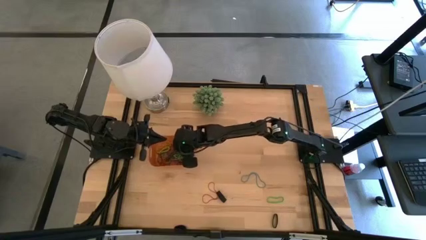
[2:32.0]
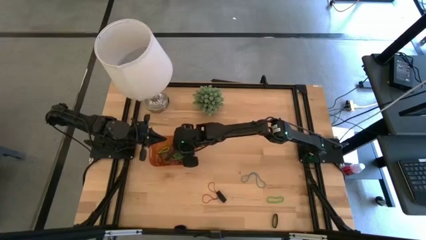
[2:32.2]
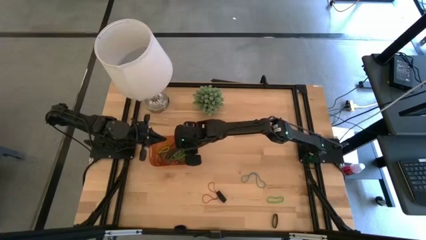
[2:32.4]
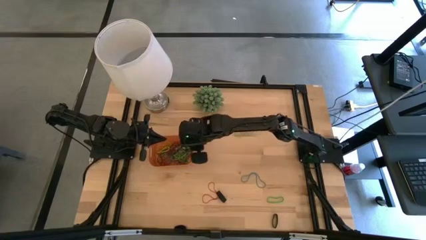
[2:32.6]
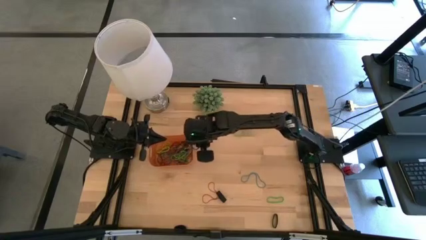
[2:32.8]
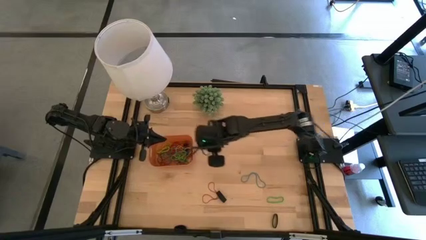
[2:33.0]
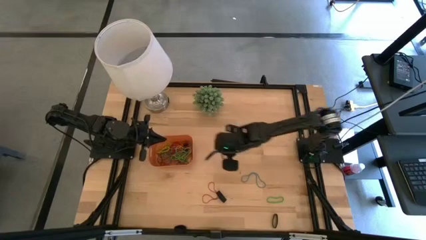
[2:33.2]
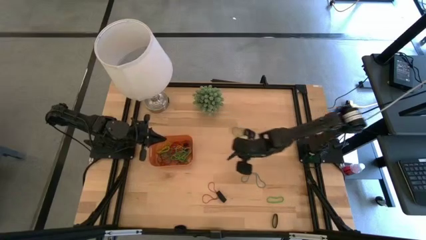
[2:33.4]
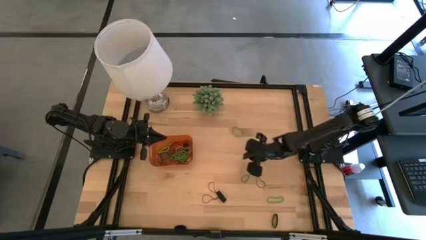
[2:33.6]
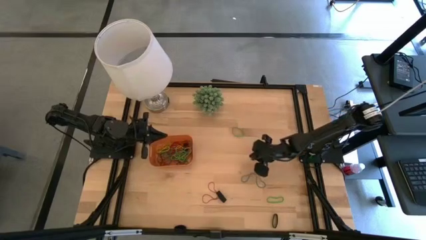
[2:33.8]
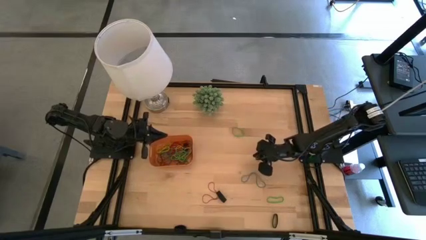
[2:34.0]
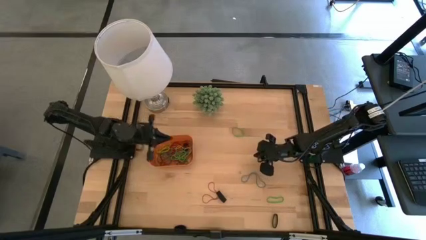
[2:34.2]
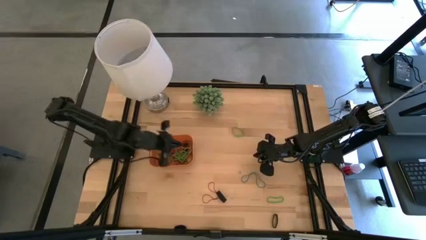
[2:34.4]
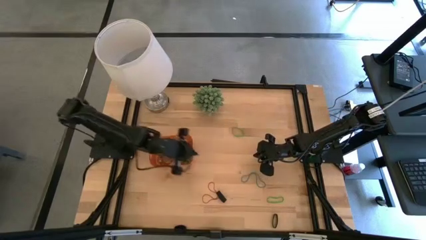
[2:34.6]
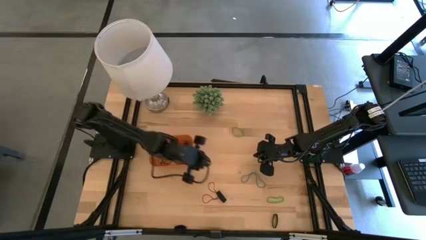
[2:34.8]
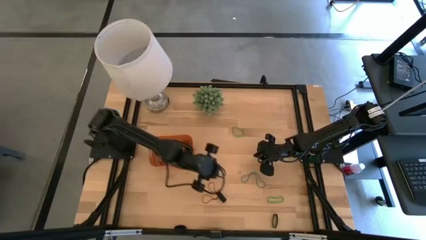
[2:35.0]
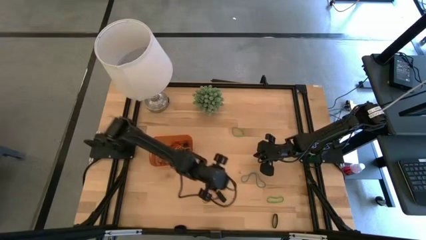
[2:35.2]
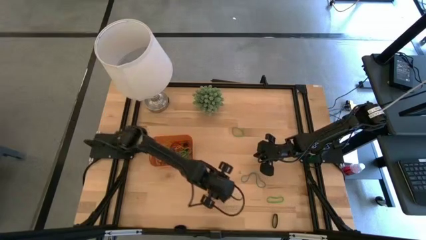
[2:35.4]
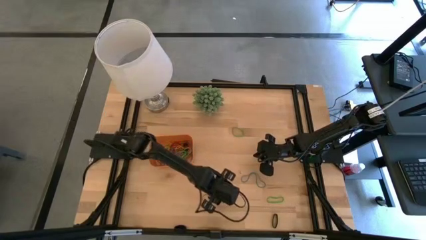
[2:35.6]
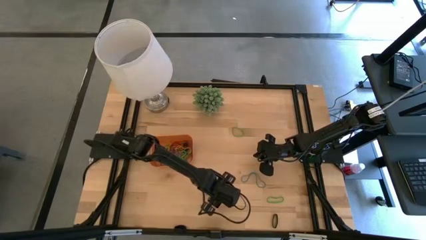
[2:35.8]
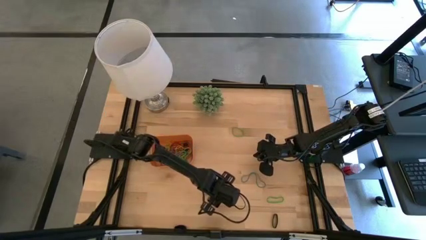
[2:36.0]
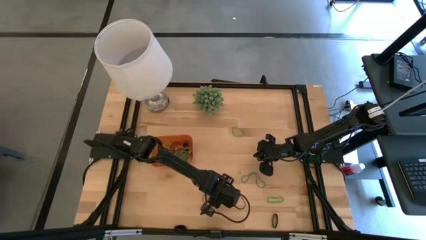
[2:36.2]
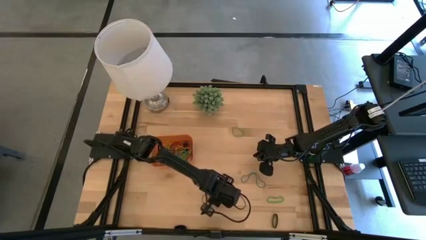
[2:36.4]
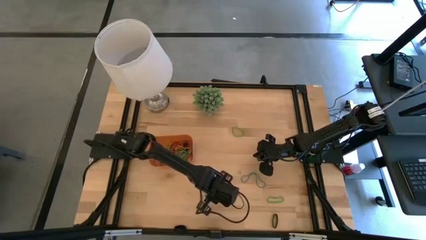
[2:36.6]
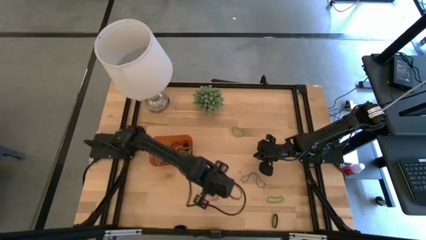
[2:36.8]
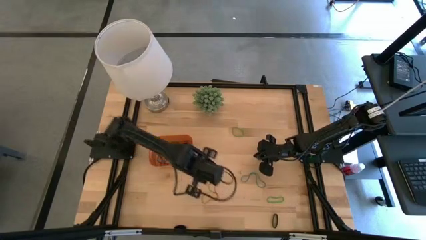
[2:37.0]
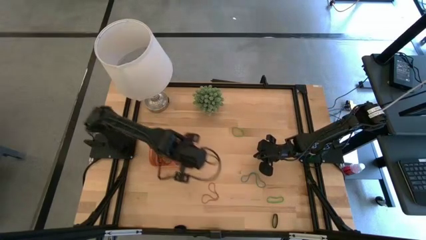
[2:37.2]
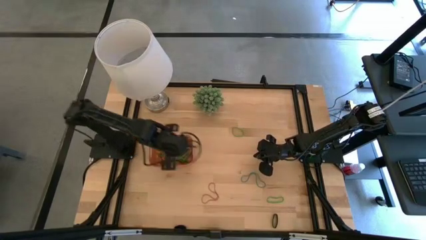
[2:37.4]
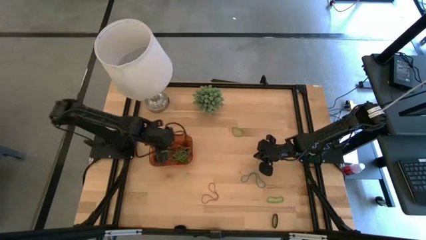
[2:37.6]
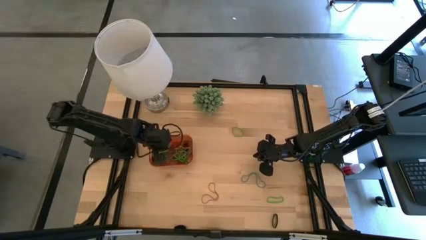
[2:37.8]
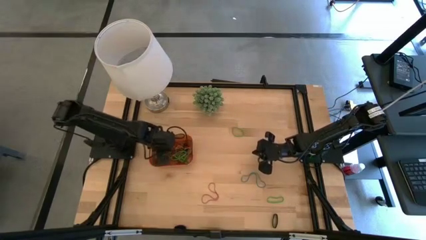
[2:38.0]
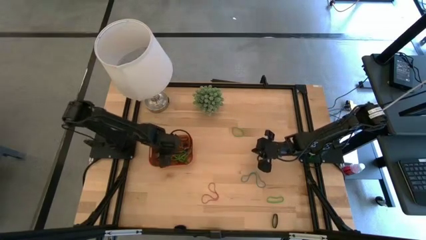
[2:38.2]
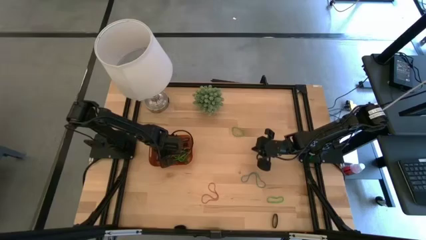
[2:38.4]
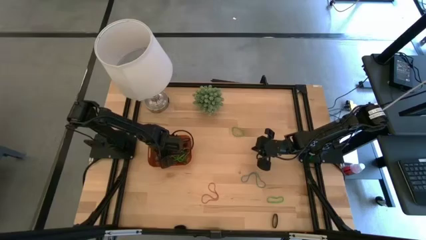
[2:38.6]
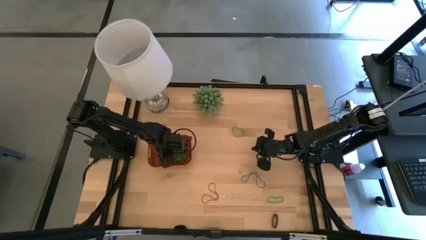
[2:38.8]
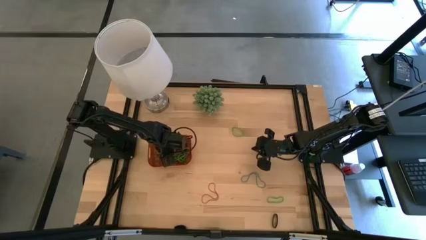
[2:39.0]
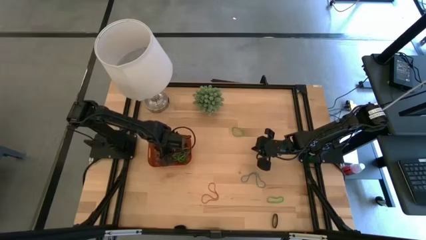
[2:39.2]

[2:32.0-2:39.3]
Task: Pick and place rubber bands into bin
Put the black rubber band into the orange bin

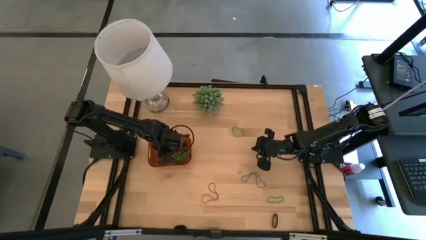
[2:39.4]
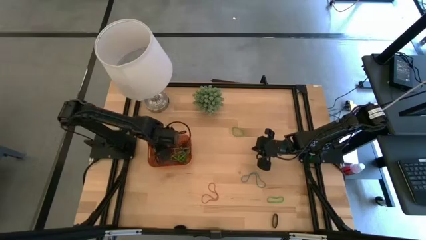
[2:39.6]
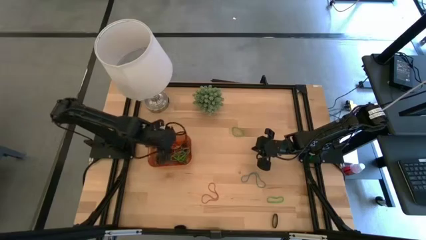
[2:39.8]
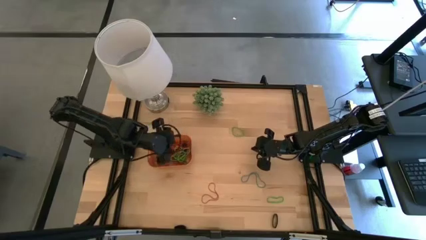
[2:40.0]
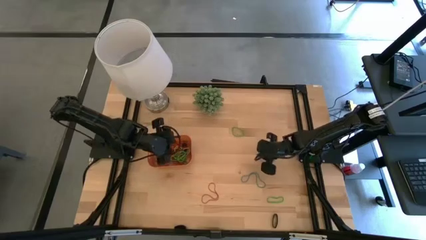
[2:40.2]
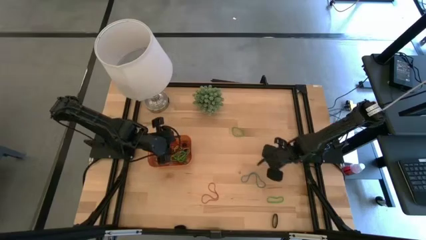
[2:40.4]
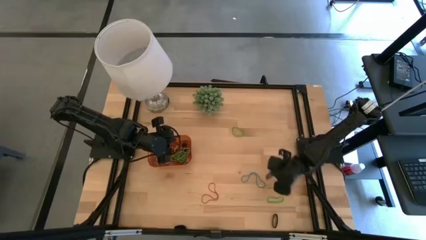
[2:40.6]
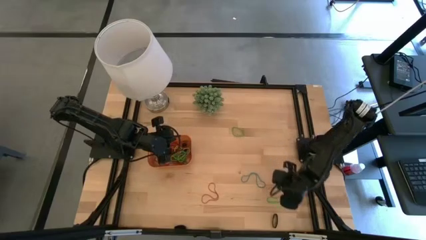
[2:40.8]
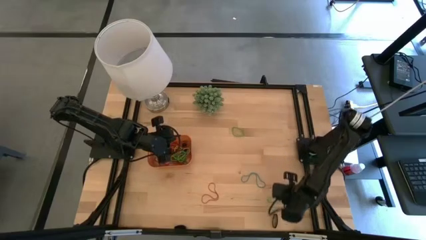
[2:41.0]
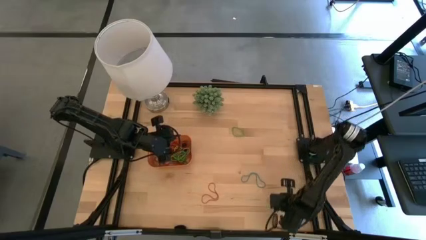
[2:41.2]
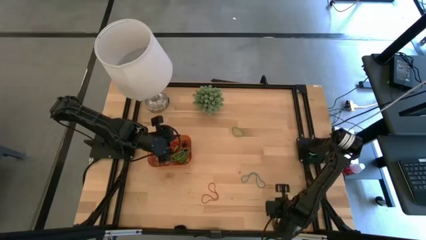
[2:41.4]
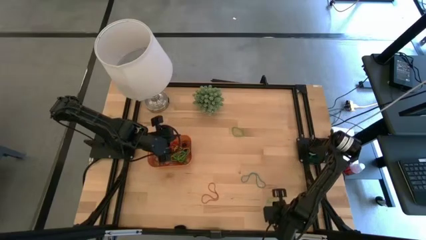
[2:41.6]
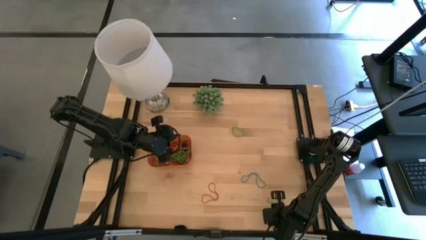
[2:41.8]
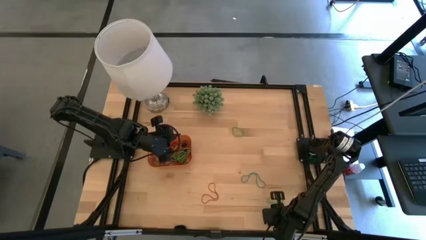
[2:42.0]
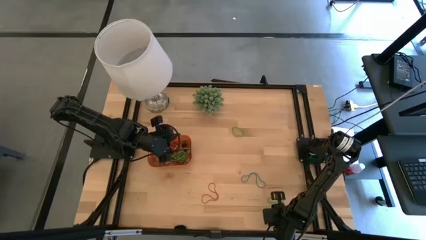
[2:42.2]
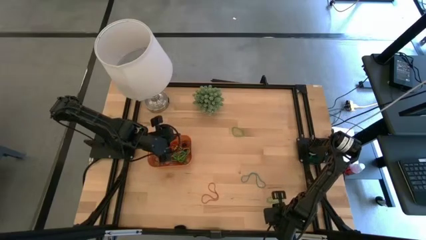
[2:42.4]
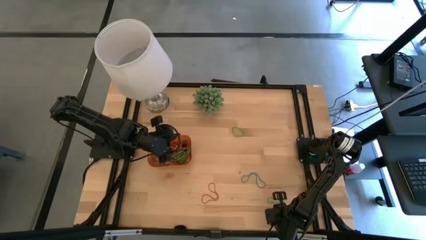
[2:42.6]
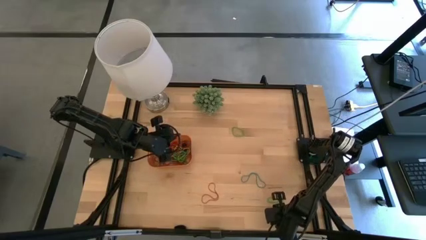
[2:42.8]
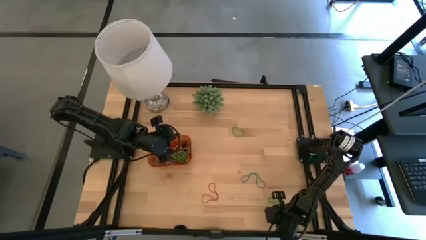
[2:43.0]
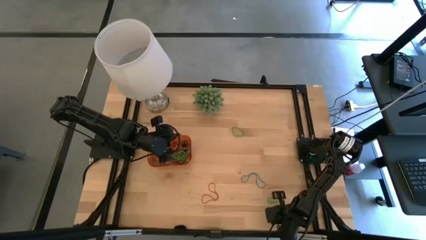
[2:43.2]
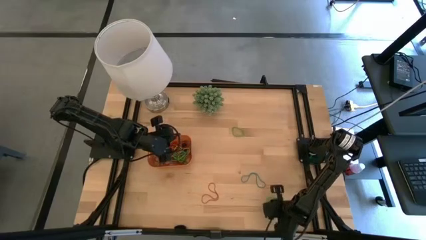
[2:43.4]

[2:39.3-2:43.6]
Put the black rubber band into the orange bin

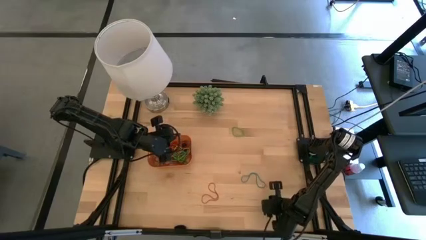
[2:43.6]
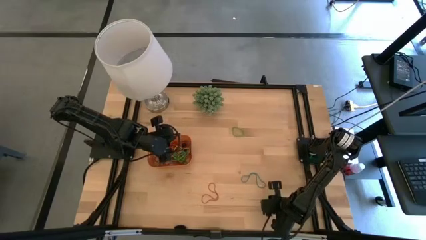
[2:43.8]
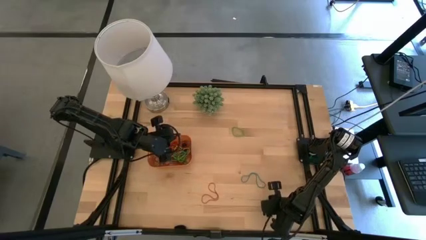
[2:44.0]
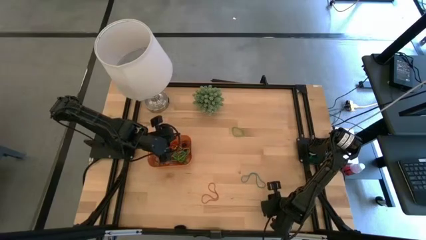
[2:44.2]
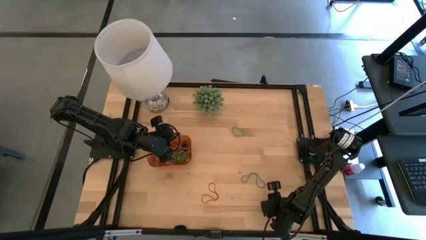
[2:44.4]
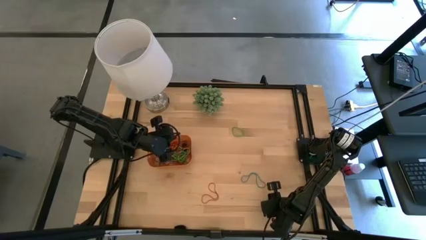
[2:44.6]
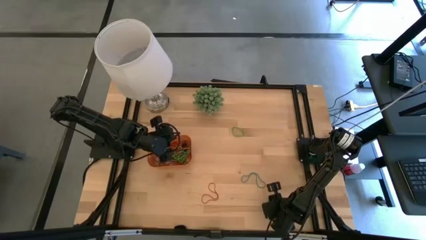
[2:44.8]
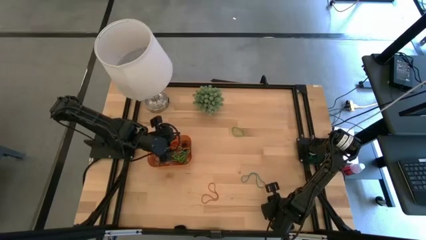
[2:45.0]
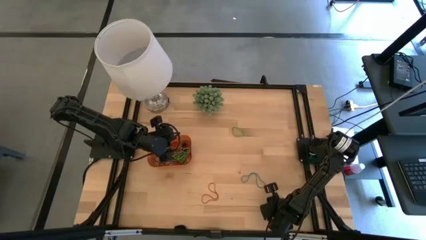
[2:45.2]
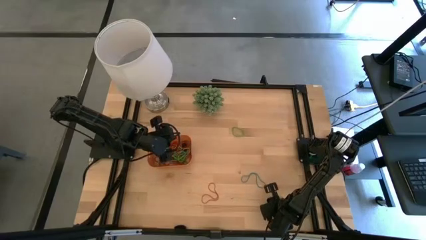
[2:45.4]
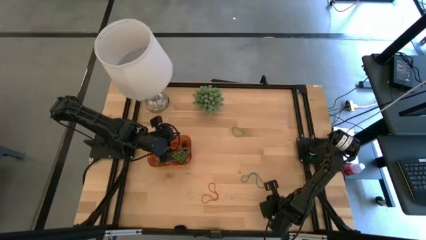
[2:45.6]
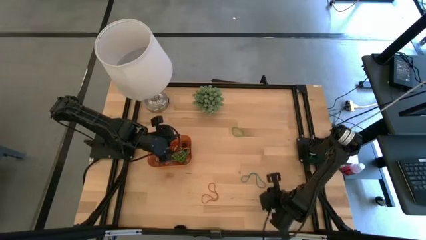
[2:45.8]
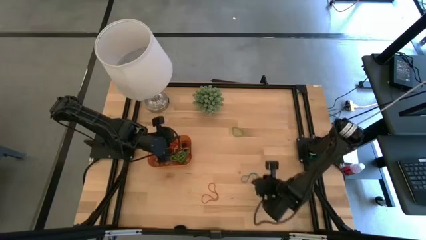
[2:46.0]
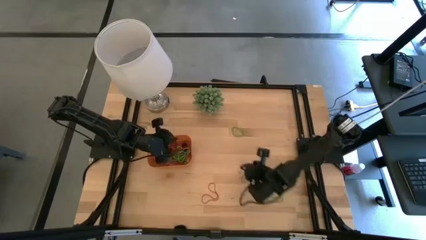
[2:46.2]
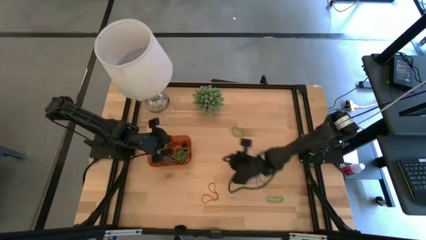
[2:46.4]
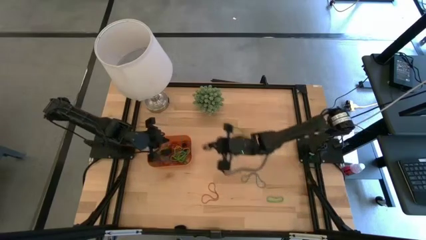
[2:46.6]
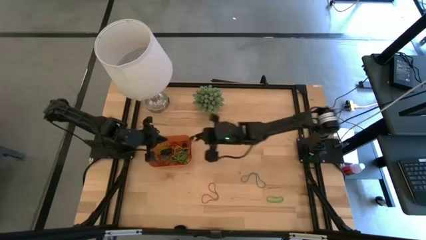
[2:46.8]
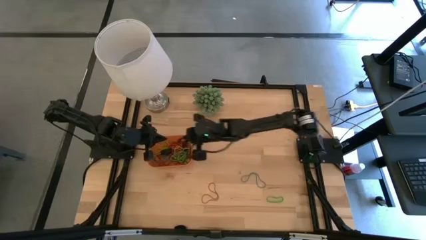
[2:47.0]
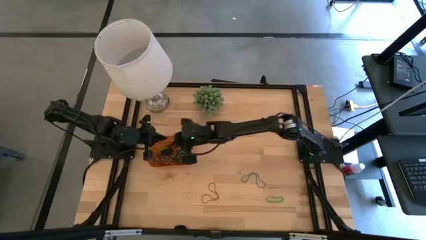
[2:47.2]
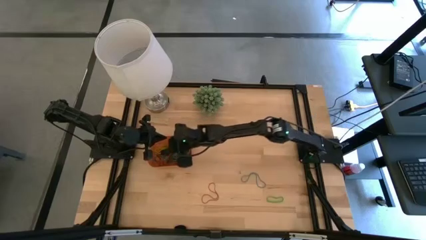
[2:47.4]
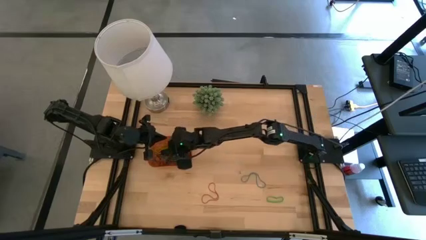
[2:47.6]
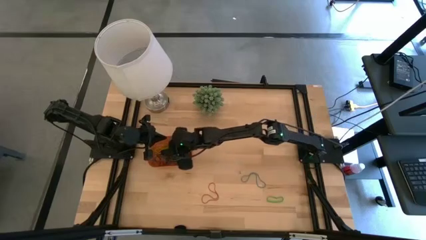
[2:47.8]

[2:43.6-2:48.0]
Put the black rubber band into the orange bin

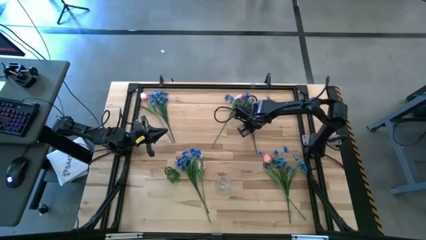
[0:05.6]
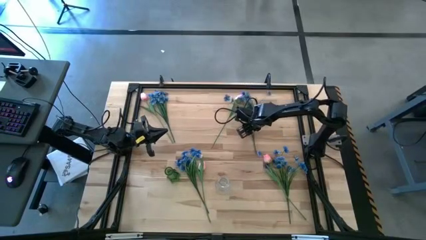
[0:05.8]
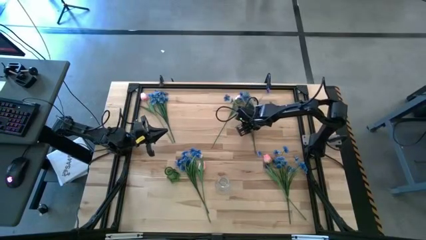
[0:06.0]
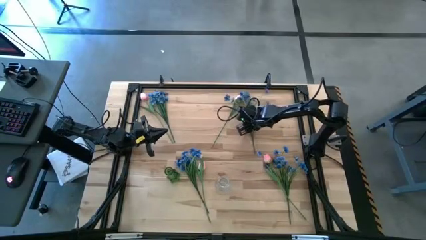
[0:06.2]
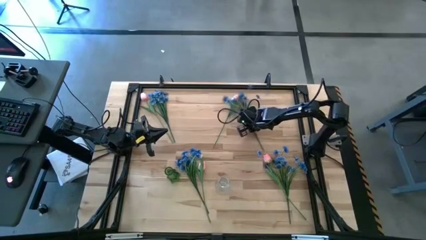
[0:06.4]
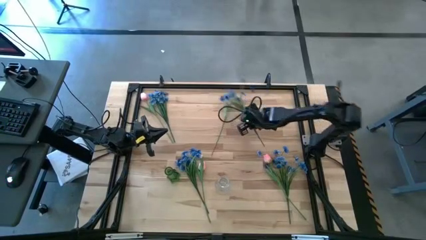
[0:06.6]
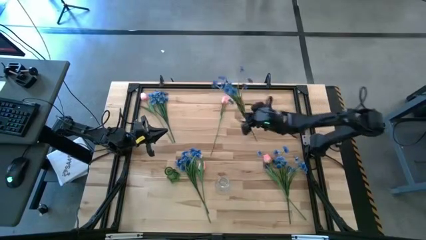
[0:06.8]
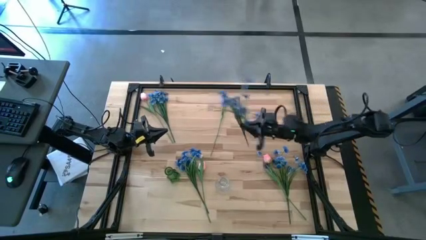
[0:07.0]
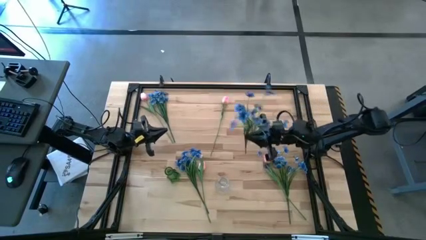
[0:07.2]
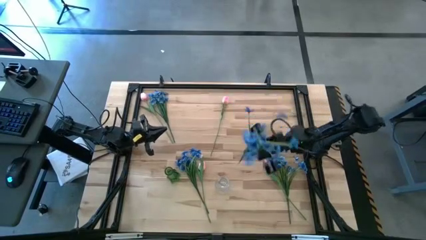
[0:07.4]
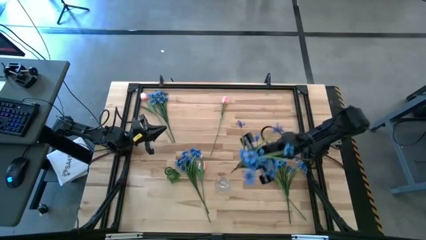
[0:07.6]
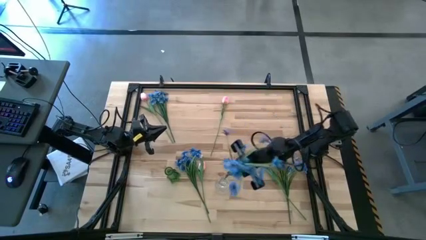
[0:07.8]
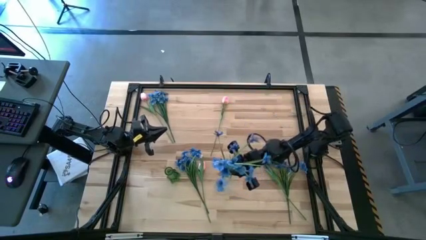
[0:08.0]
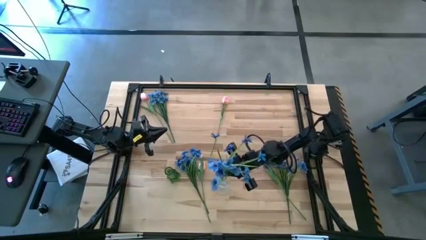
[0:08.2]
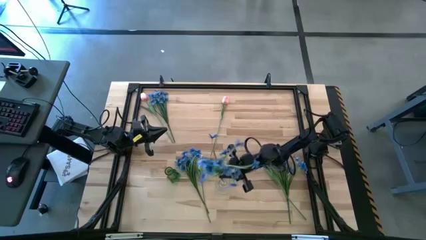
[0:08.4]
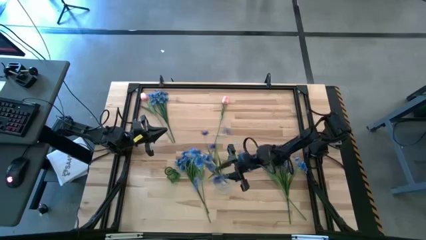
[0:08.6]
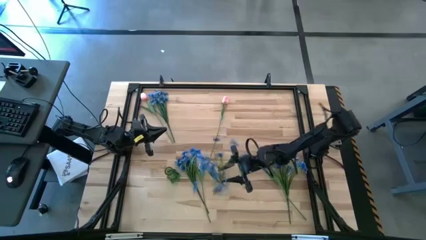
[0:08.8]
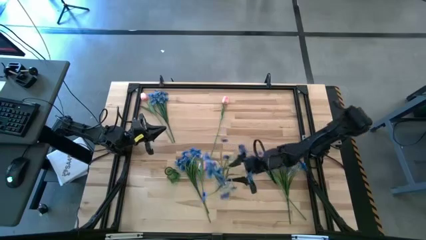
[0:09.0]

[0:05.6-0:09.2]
Task: Sort flowers into vase by color
Put the top right blue flower into the transparent vase
